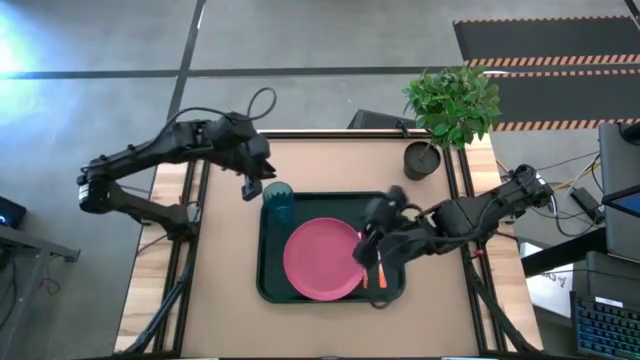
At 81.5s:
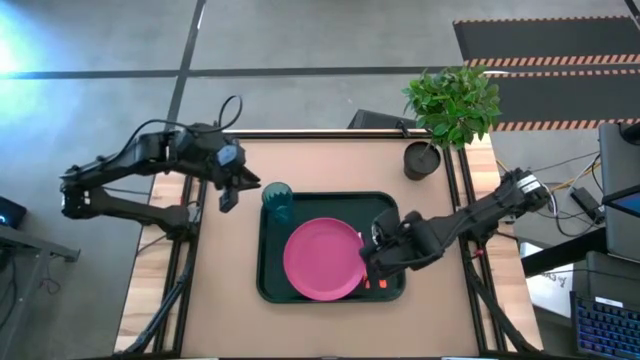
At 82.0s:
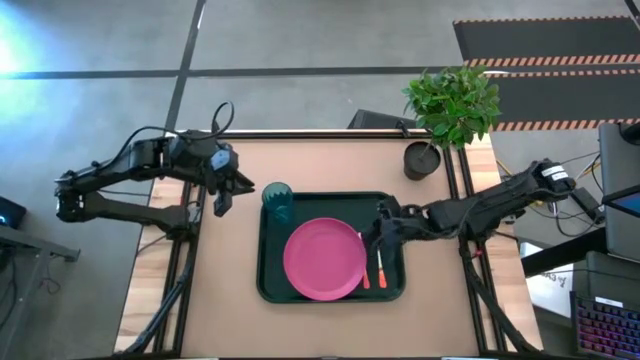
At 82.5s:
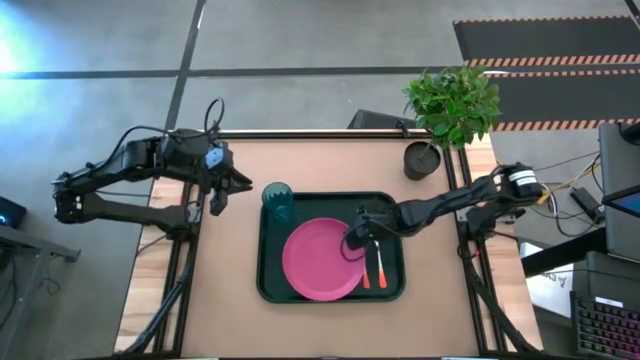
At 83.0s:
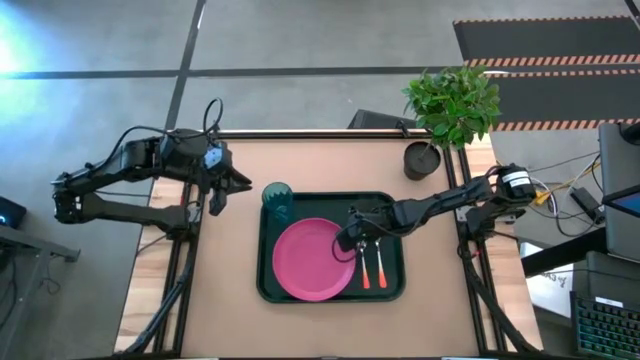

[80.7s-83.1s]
Task: Pick and place plate/cup/fork/spoon on tray
Adjust the pink plate on the black serving tray

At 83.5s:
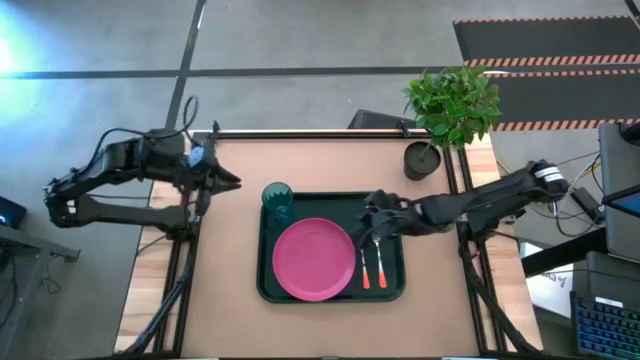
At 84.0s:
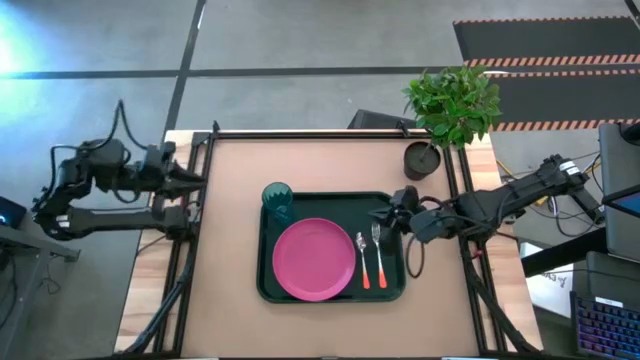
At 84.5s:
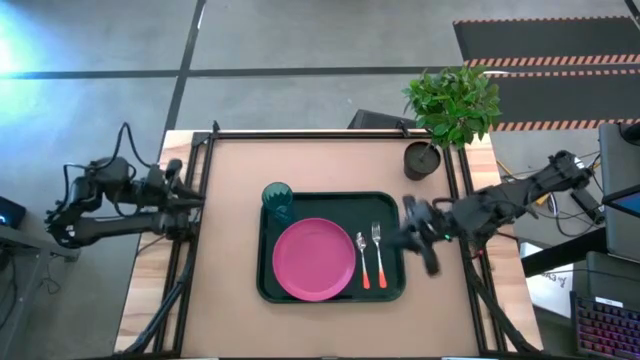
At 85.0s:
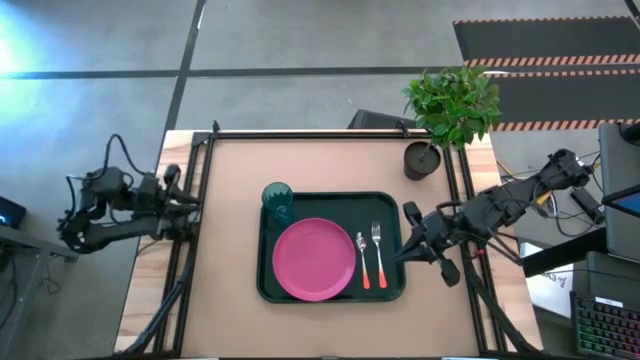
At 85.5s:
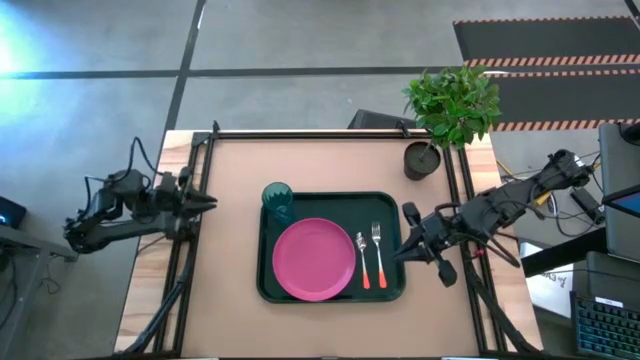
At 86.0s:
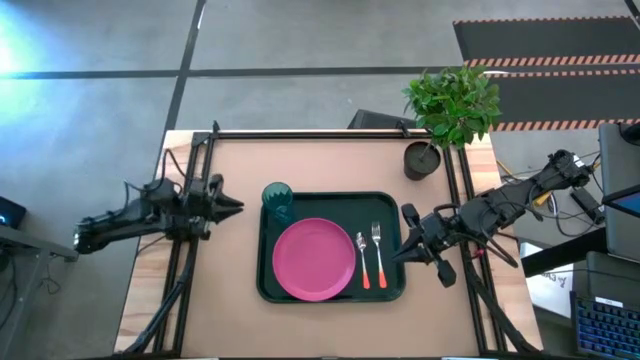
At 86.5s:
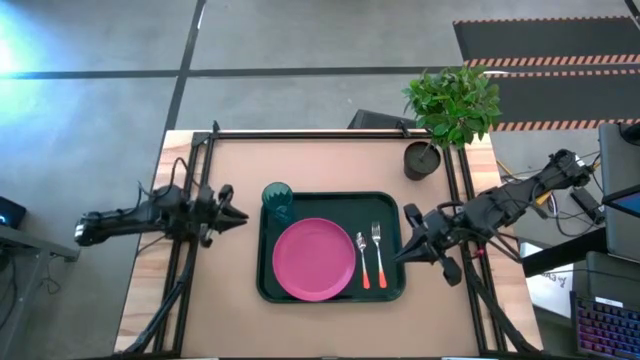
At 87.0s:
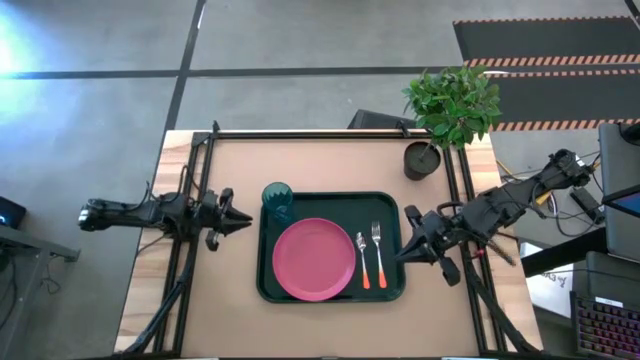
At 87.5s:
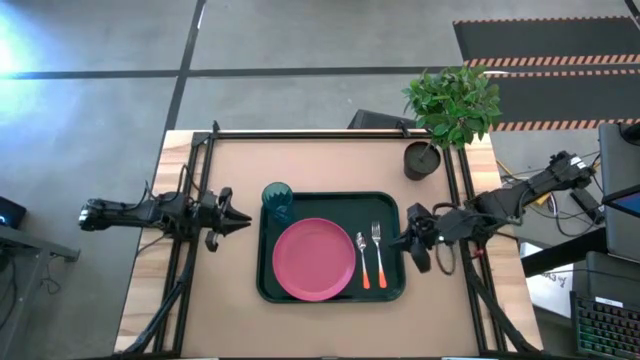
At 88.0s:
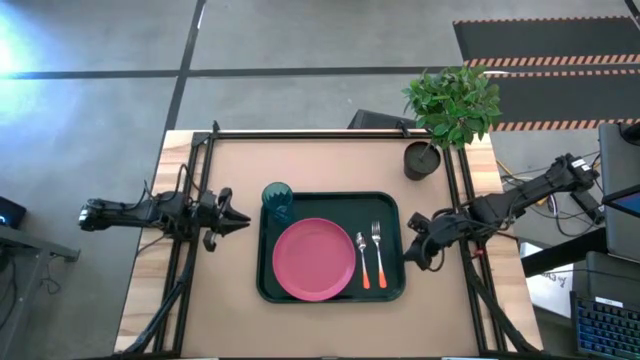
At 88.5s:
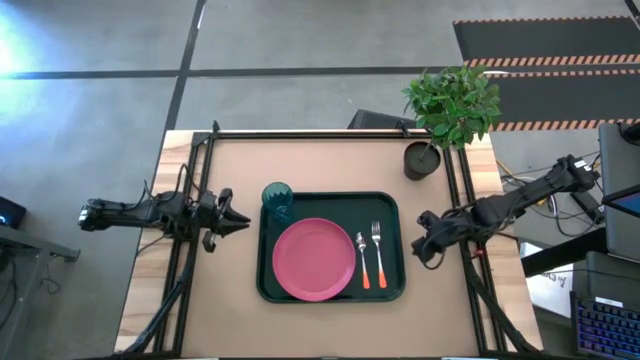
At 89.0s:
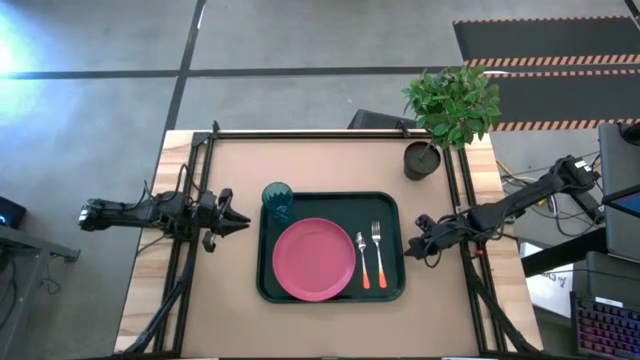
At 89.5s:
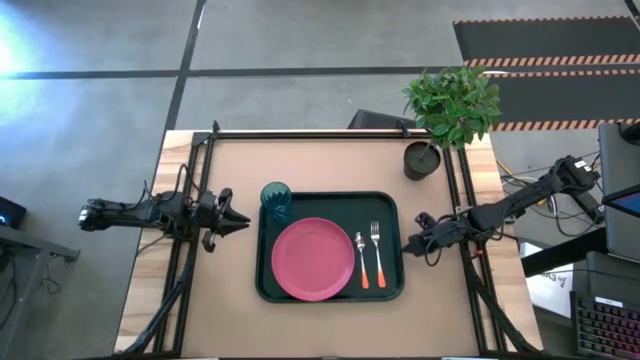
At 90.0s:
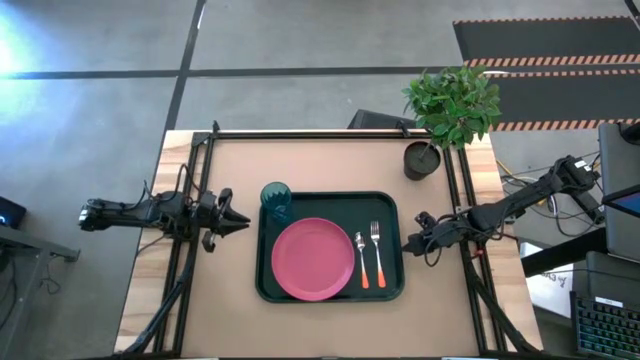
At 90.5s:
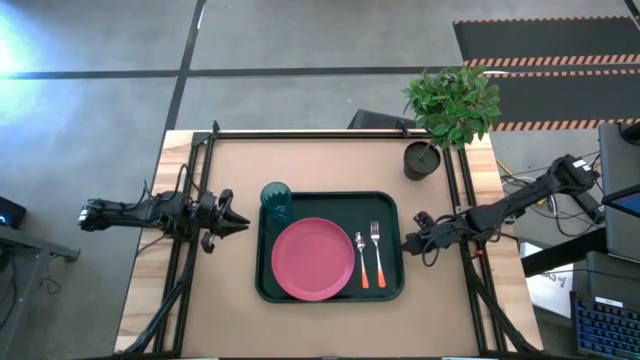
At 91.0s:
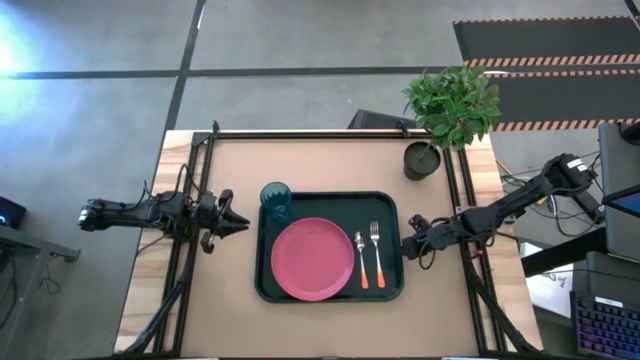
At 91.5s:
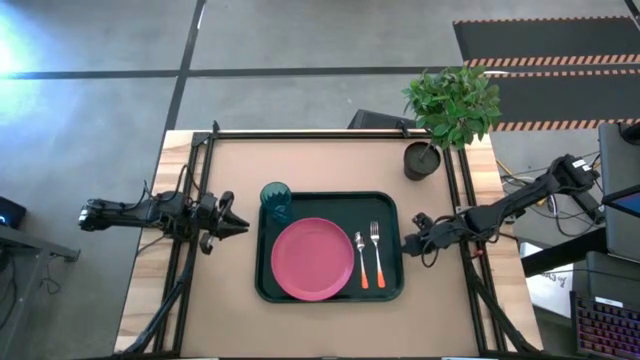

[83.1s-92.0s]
Adjust the black serving tray on the table

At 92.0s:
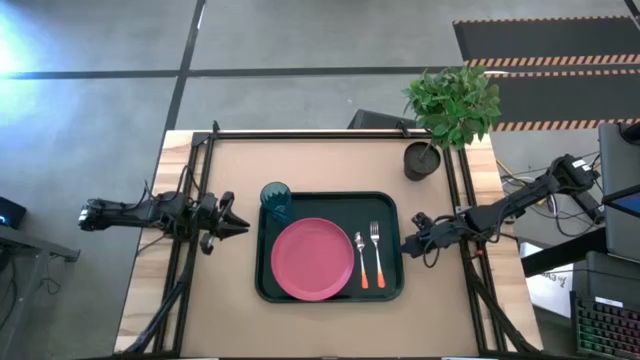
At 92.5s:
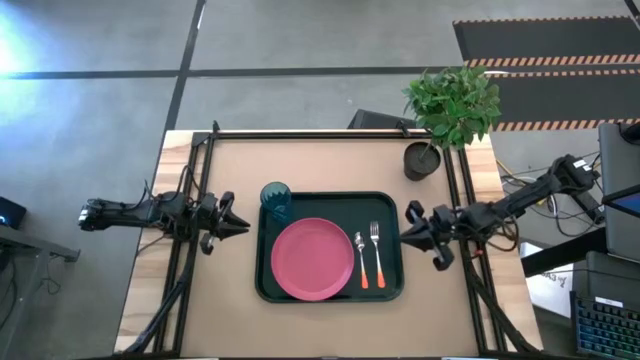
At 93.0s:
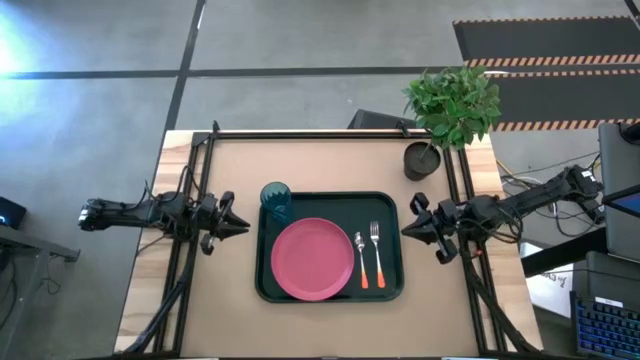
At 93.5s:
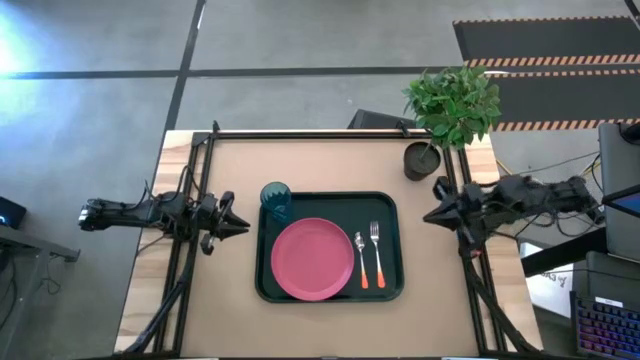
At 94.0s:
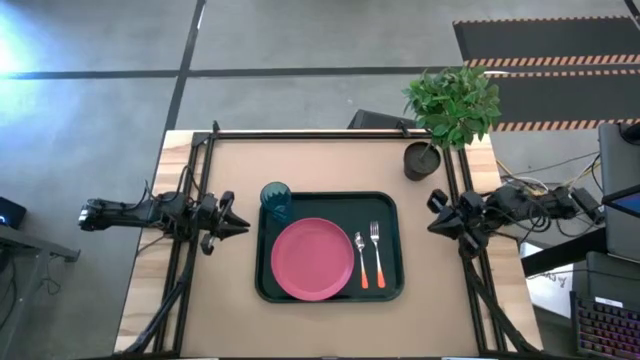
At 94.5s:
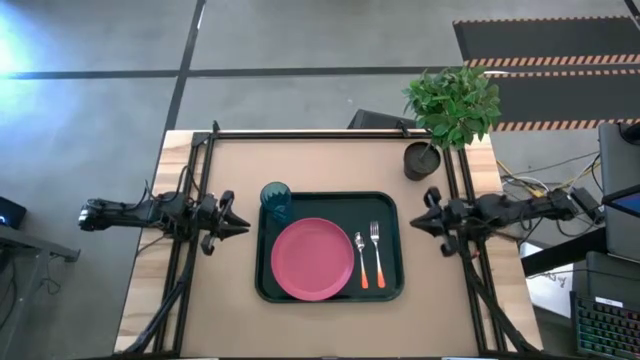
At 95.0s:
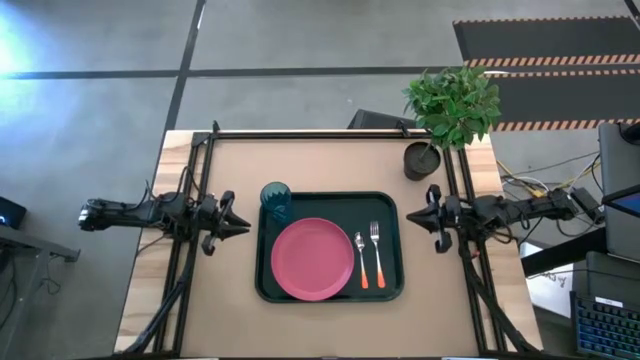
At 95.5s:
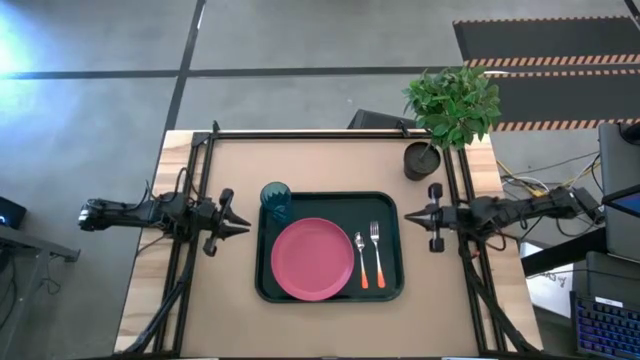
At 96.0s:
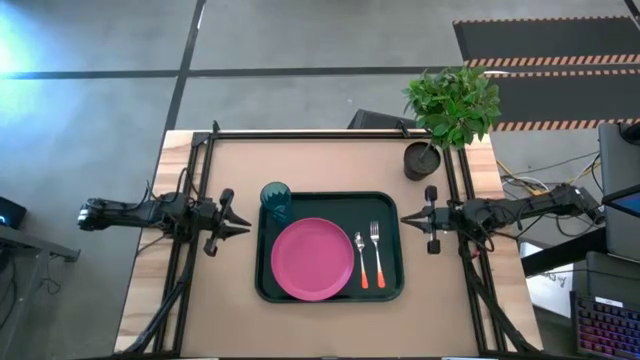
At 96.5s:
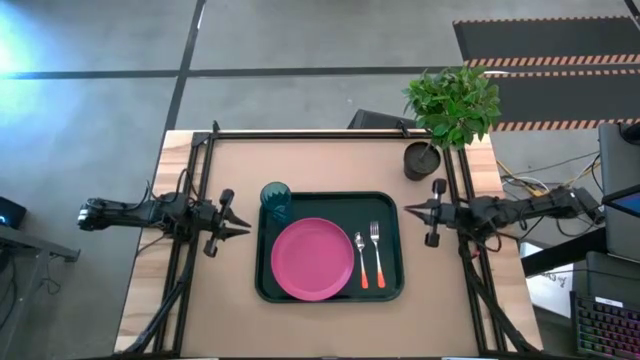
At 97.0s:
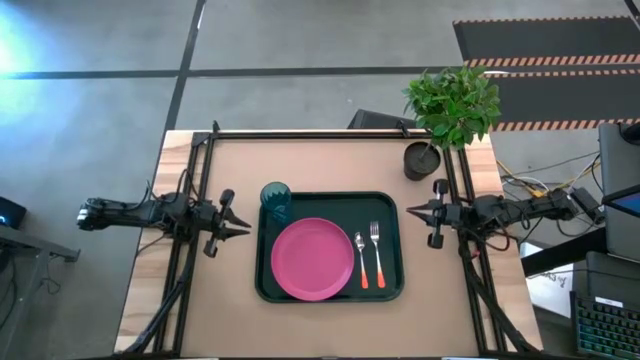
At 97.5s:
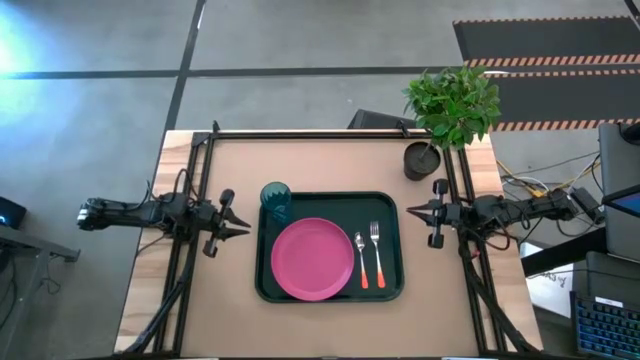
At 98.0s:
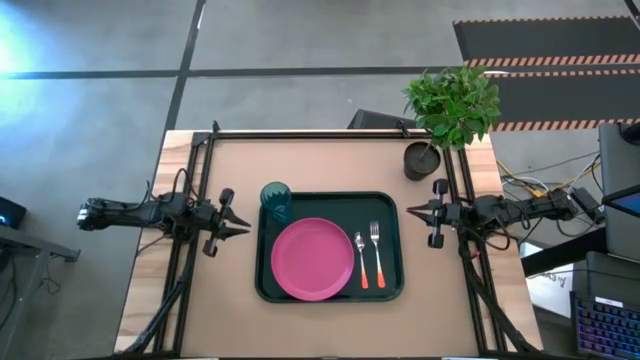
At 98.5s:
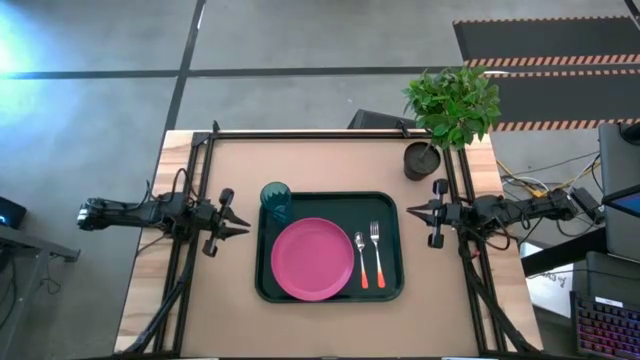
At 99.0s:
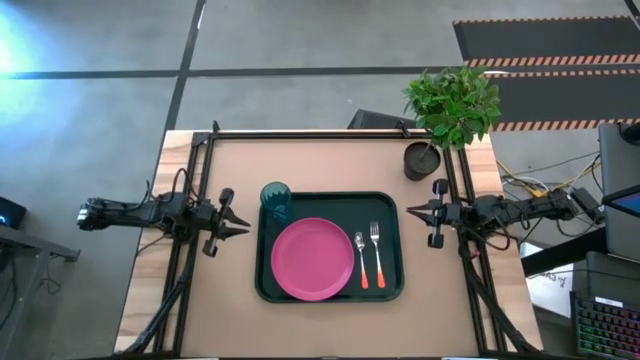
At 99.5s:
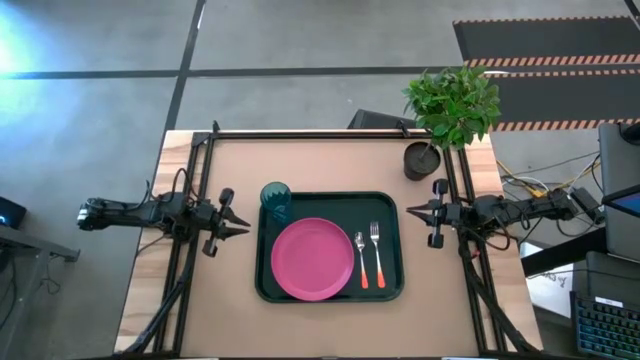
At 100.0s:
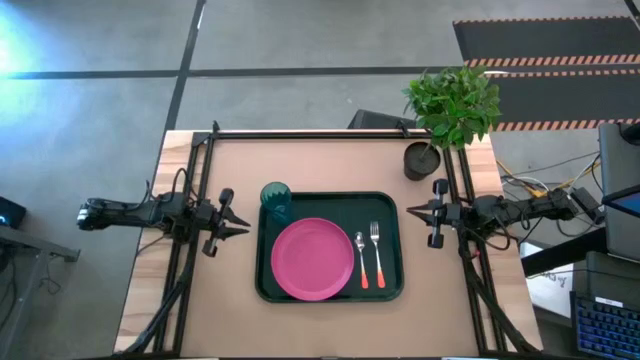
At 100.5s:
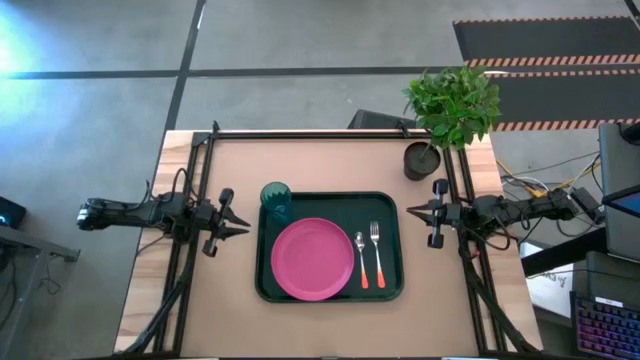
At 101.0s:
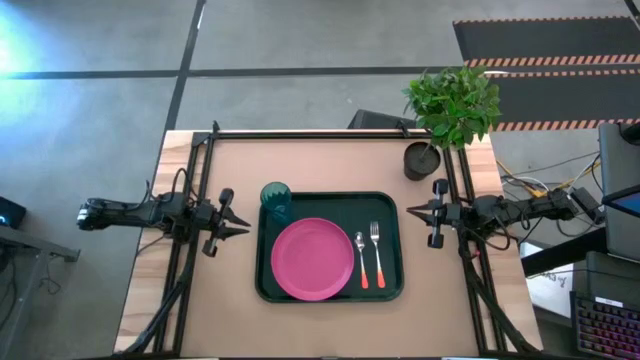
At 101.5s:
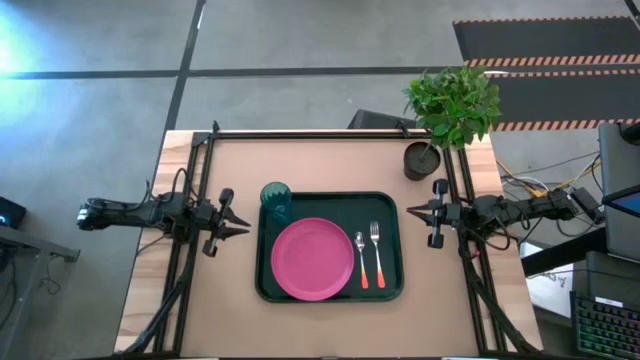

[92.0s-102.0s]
Return to Home Position
